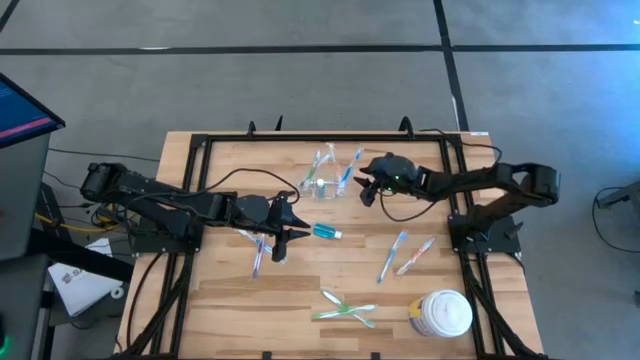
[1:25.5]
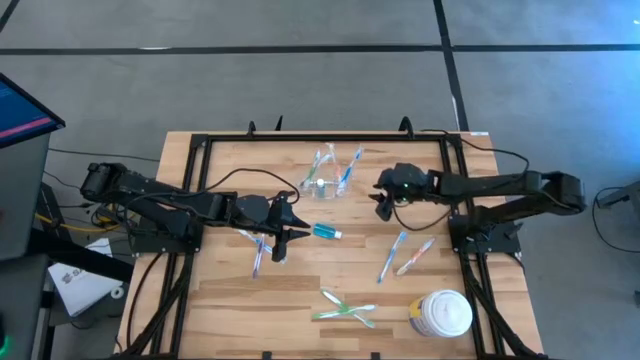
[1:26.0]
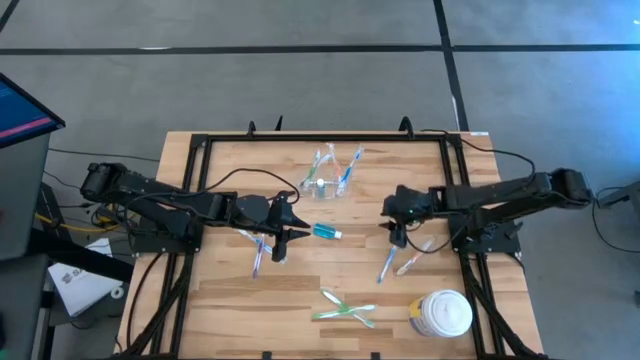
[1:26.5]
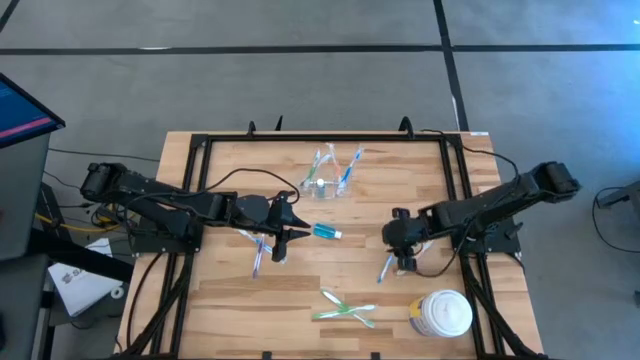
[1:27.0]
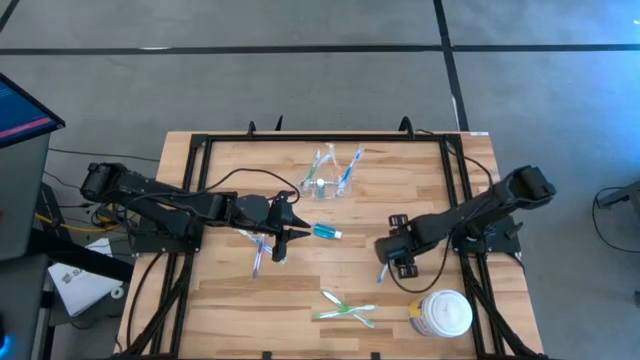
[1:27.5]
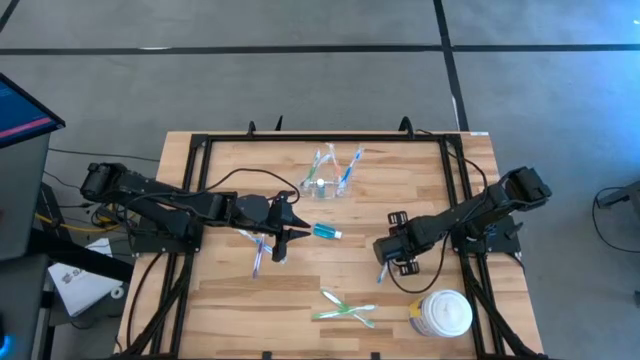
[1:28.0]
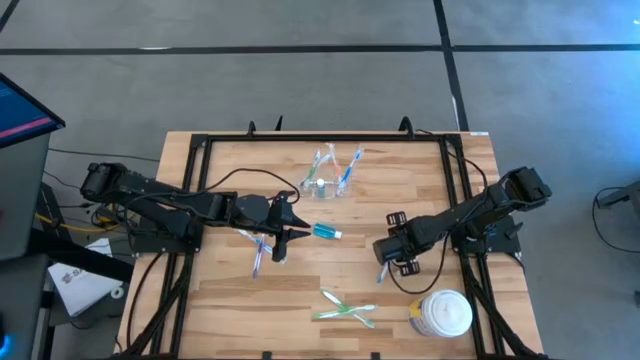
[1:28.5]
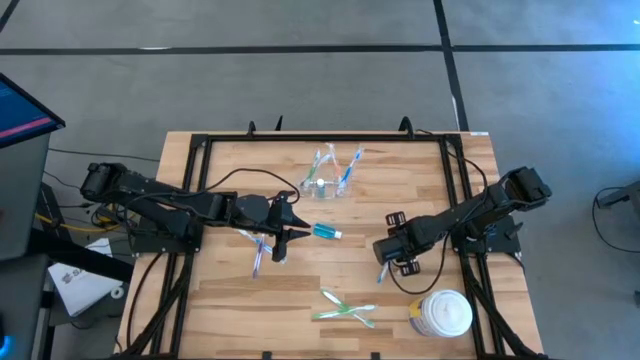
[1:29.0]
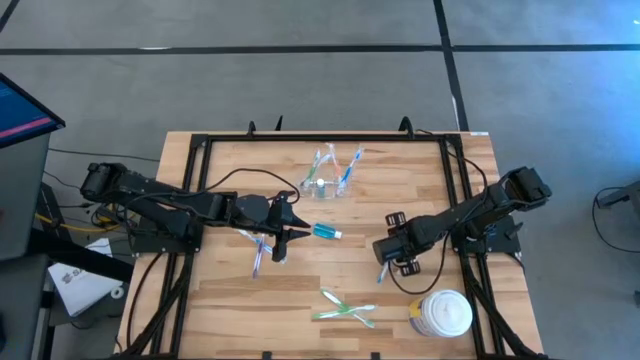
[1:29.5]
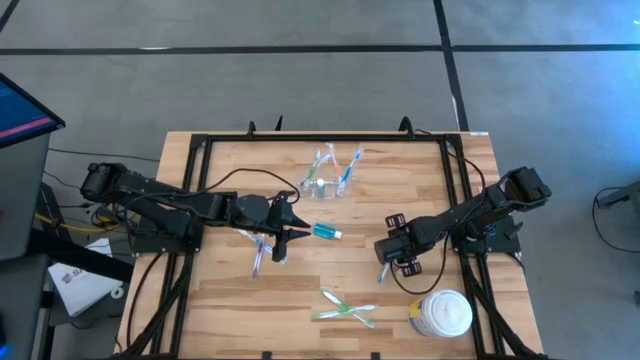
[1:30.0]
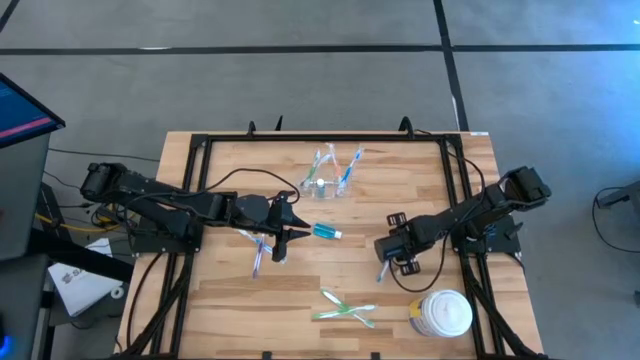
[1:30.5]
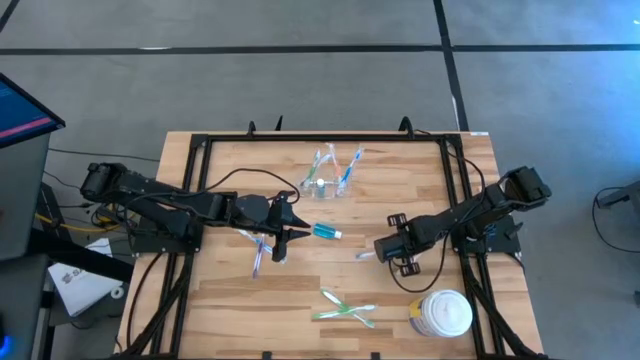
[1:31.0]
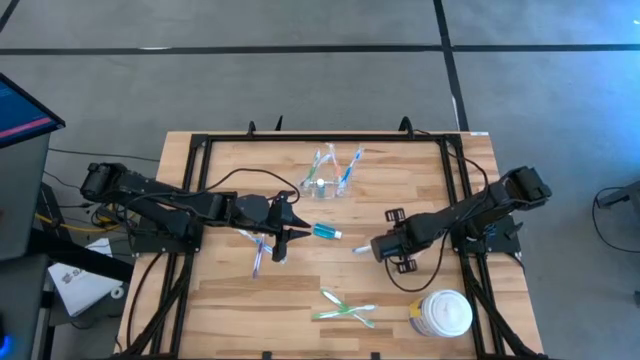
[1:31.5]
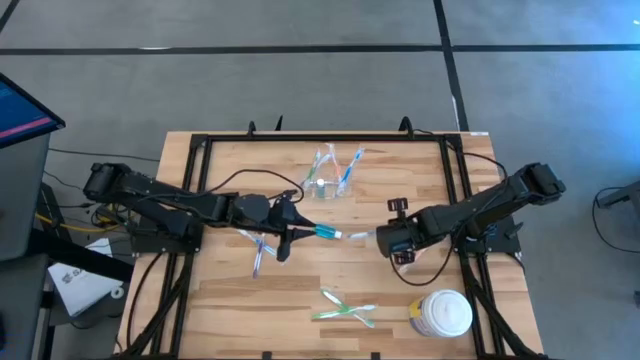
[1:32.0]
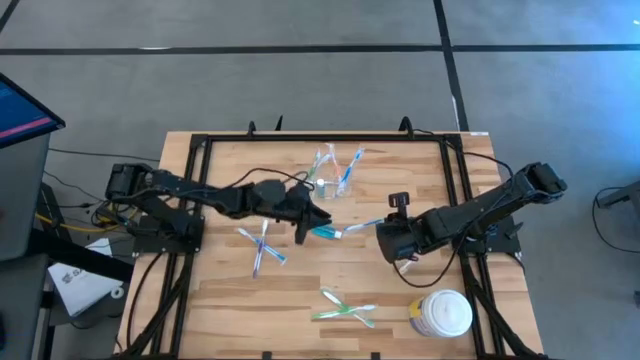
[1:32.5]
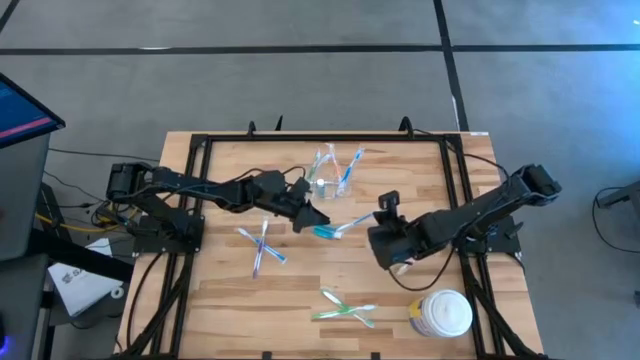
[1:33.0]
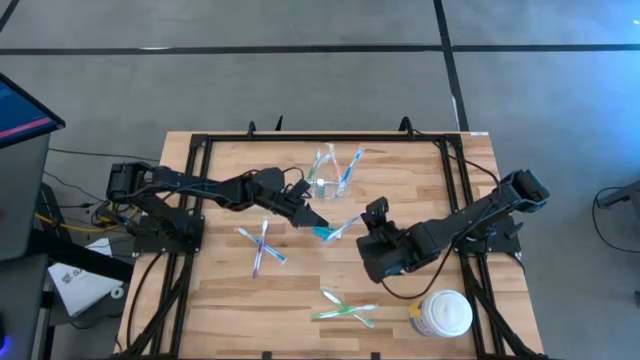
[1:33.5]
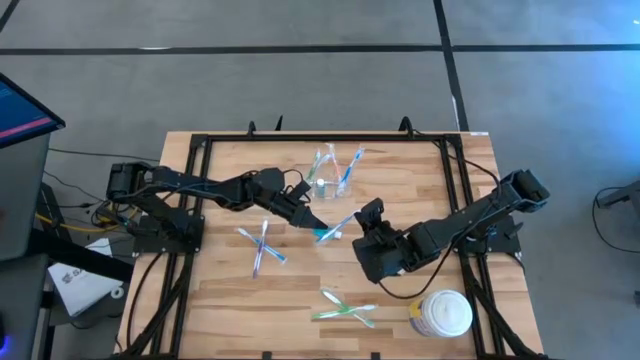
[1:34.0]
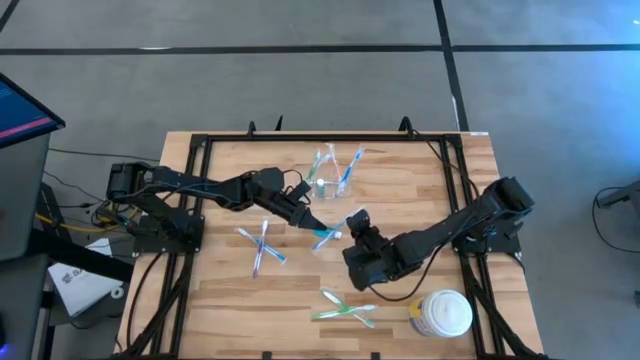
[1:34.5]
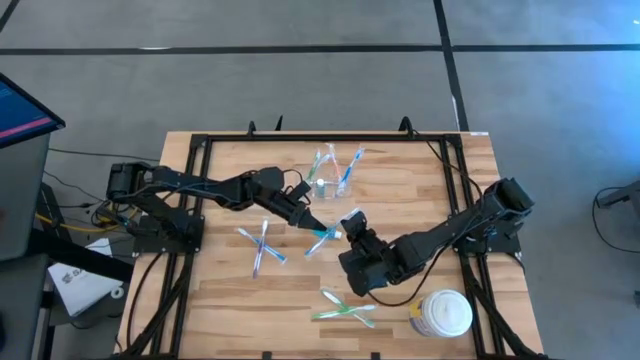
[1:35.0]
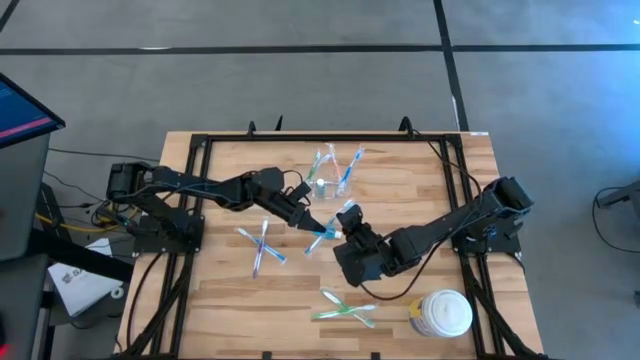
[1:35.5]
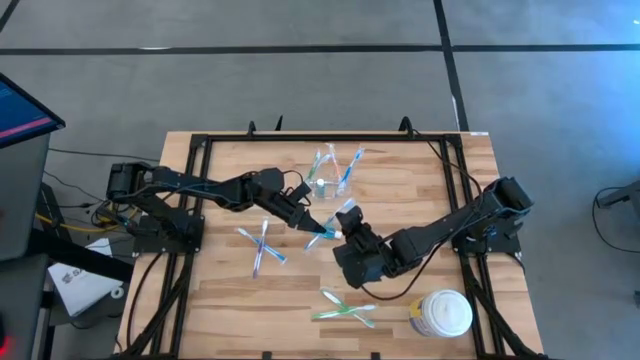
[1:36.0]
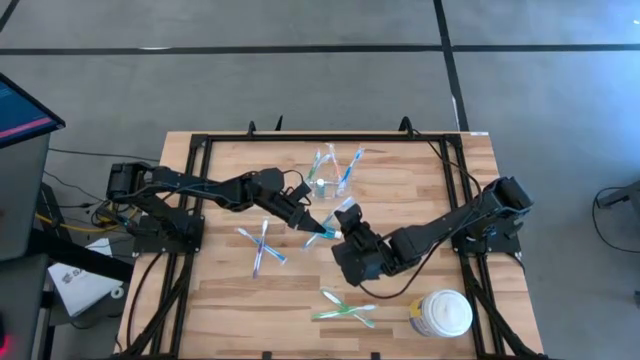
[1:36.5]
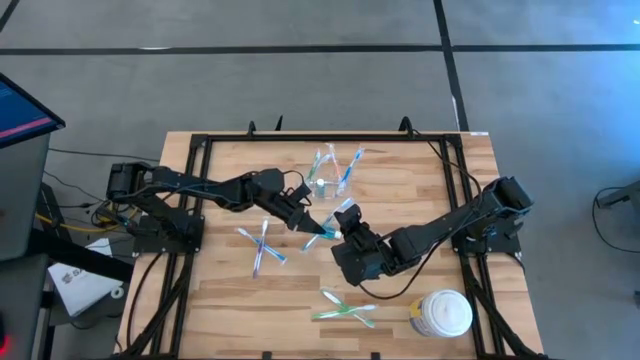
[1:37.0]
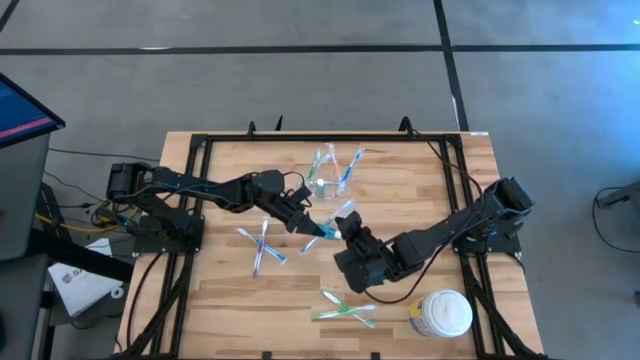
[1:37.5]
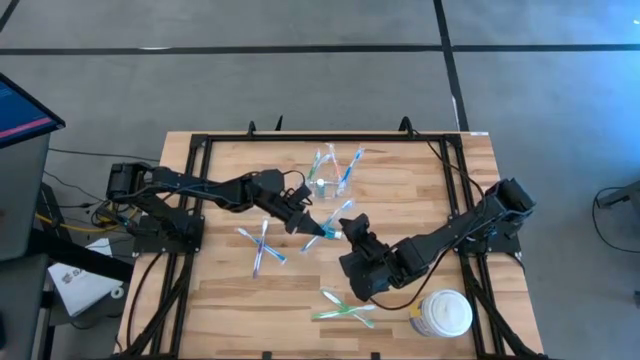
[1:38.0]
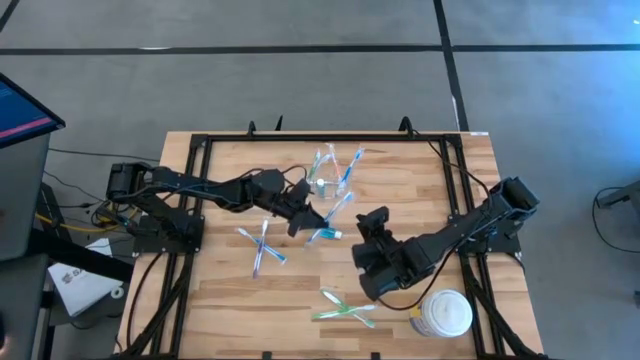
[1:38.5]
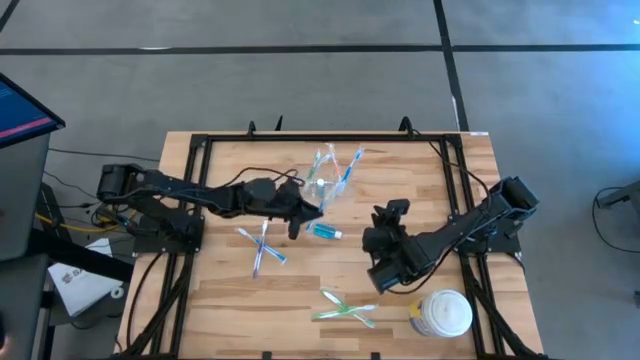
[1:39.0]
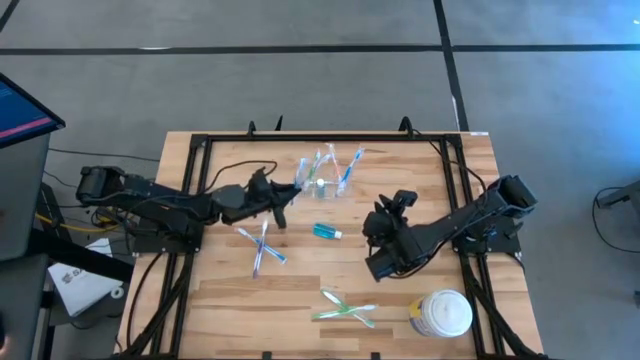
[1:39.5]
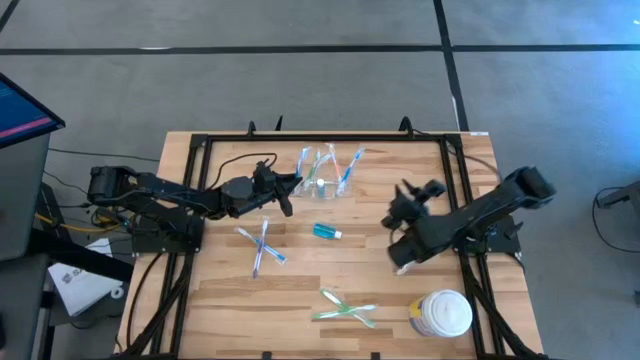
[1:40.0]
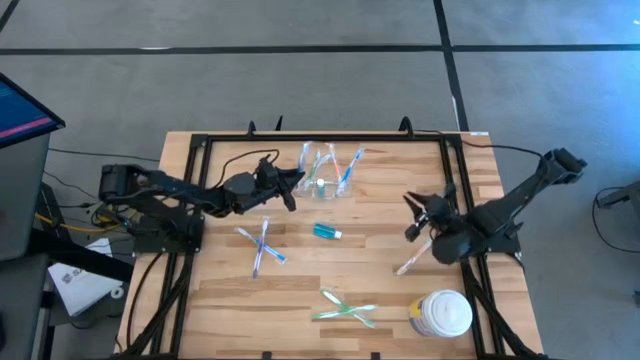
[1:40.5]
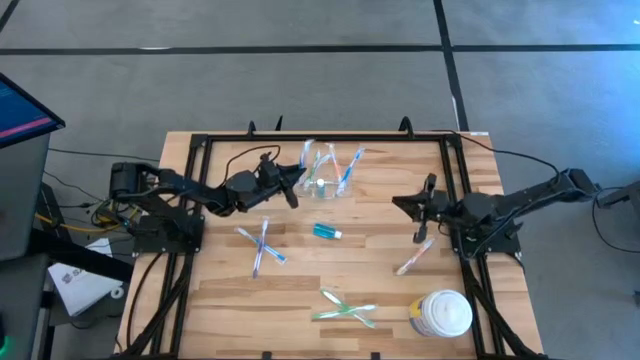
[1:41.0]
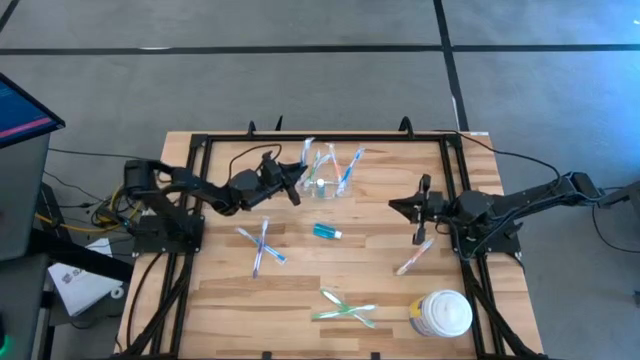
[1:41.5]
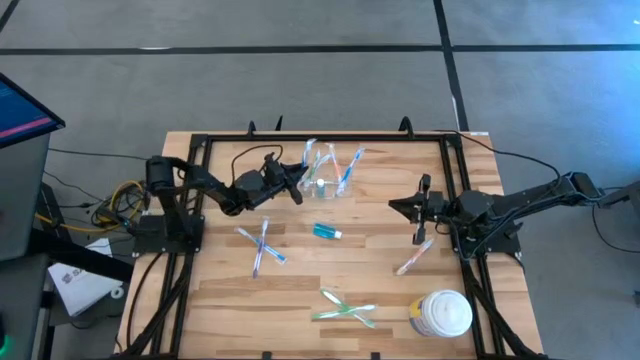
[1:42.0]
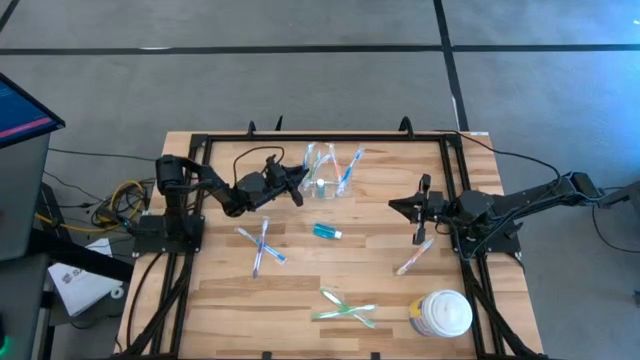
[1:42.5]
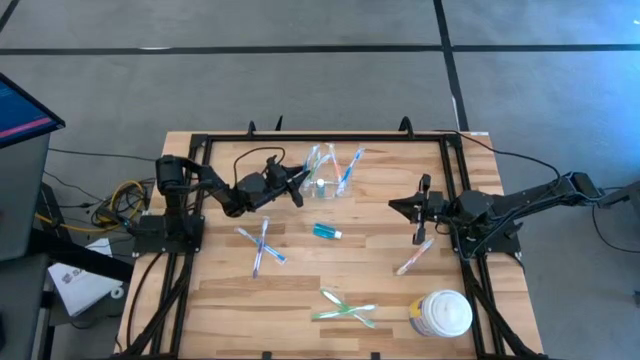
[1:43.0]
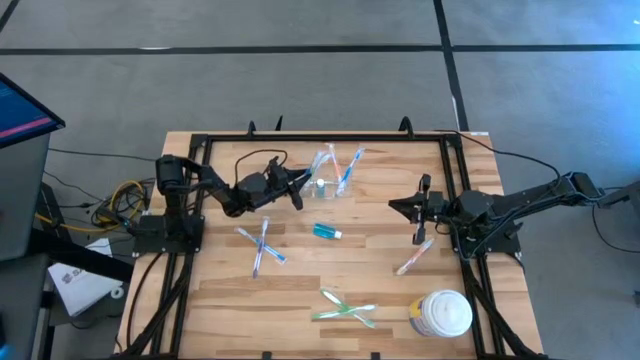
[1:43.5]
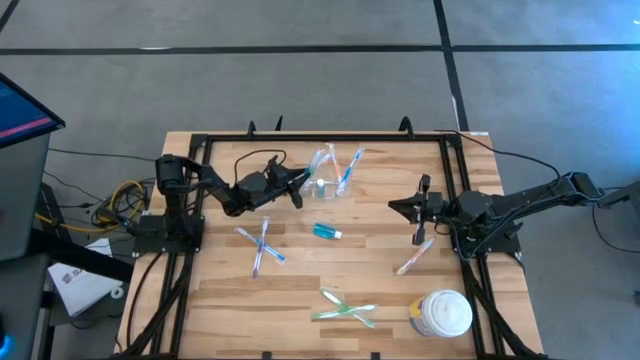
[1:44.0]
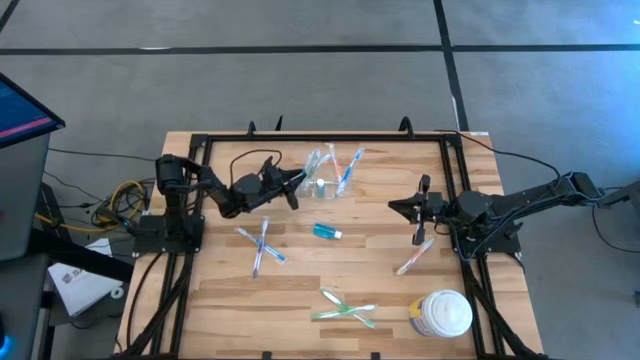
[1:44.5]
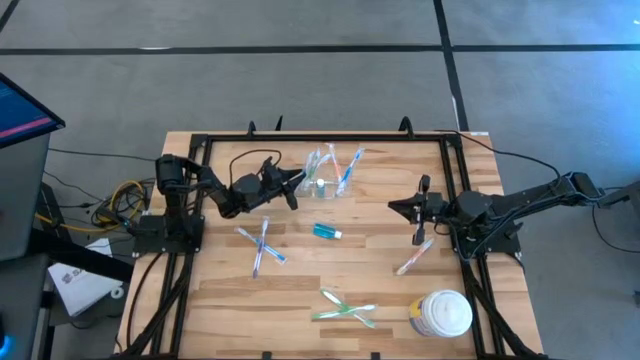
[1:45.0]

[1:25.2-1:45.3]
Task: Pick & Place toothbrushing station
Put the right blue toothbrush into the transparent organizer
